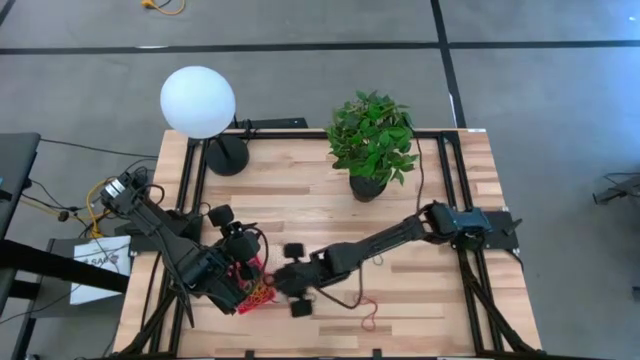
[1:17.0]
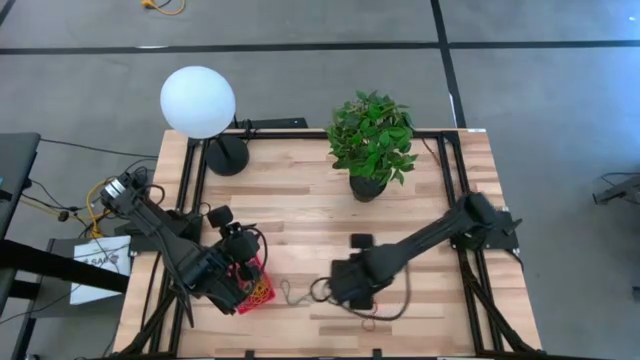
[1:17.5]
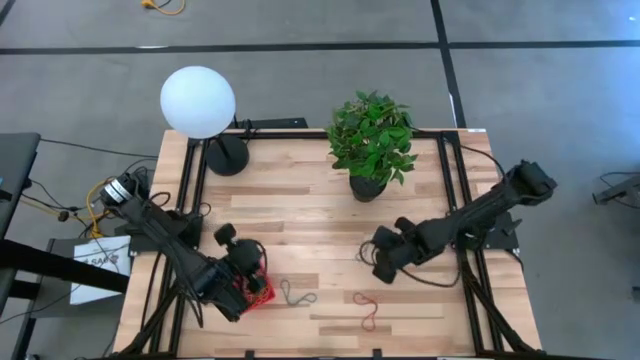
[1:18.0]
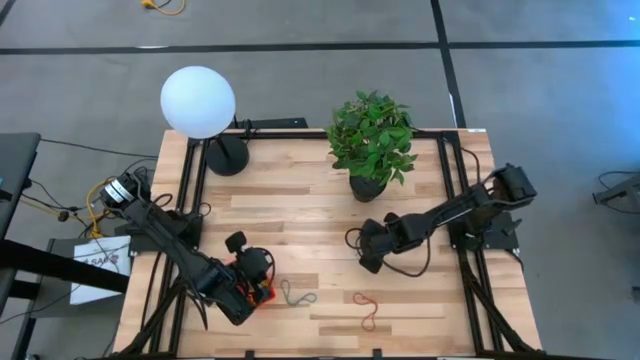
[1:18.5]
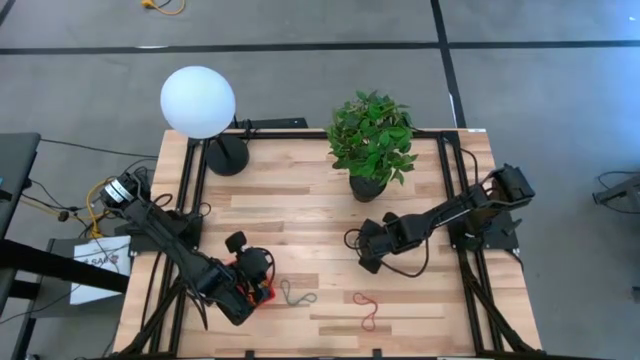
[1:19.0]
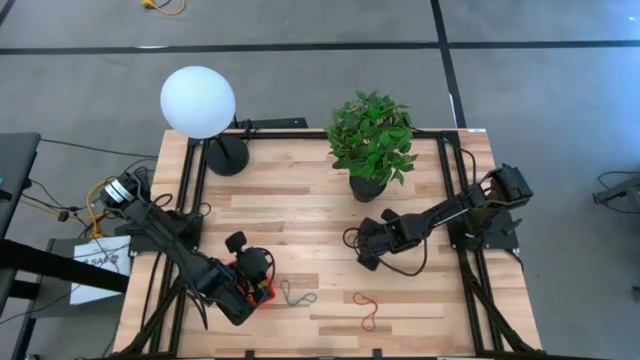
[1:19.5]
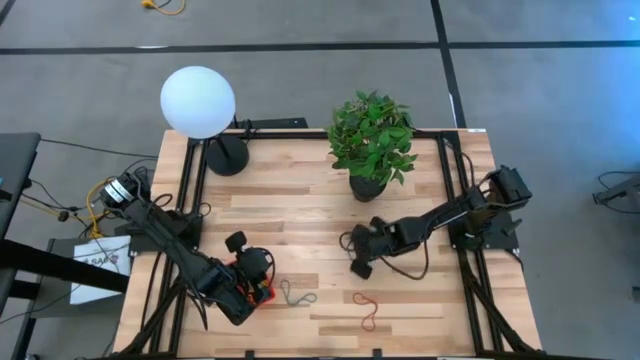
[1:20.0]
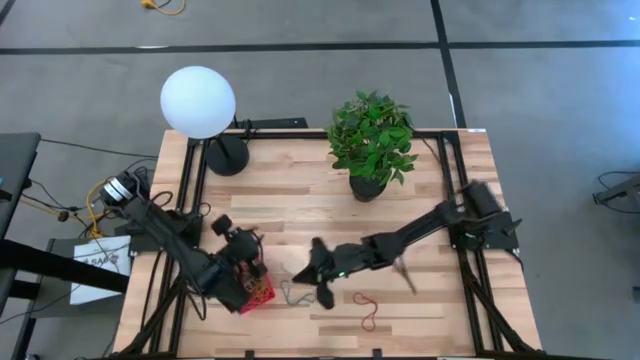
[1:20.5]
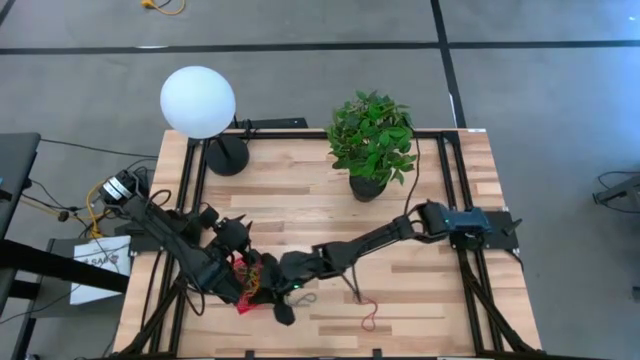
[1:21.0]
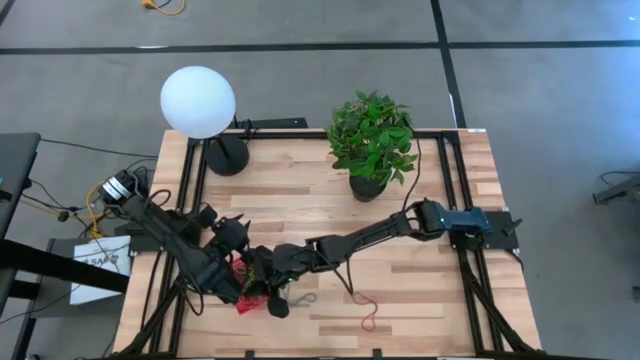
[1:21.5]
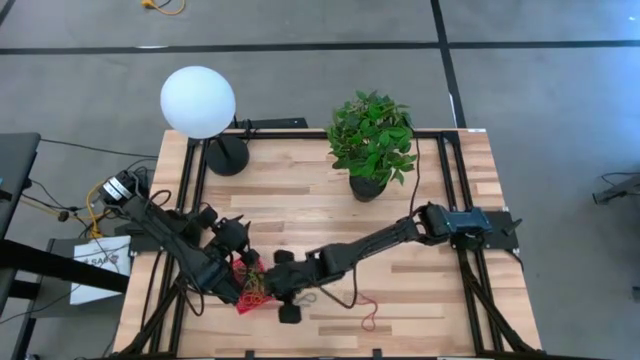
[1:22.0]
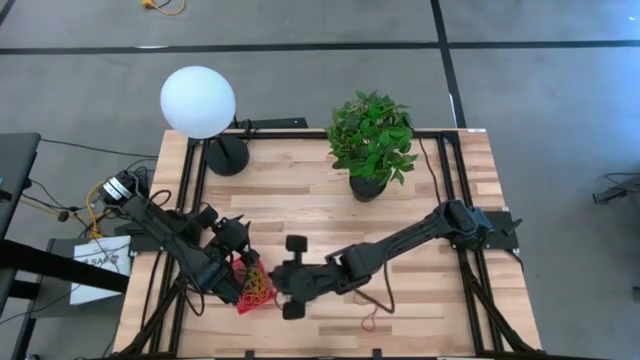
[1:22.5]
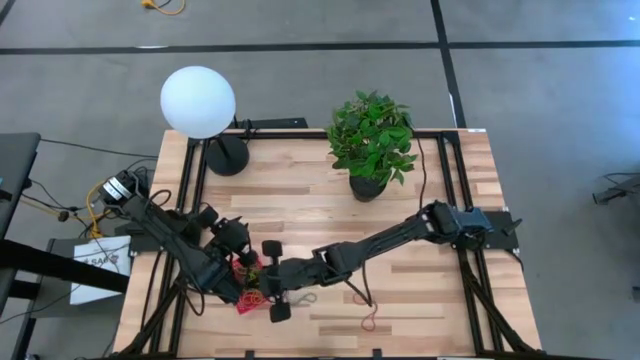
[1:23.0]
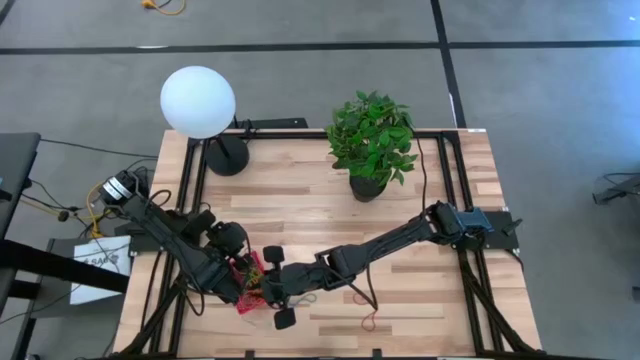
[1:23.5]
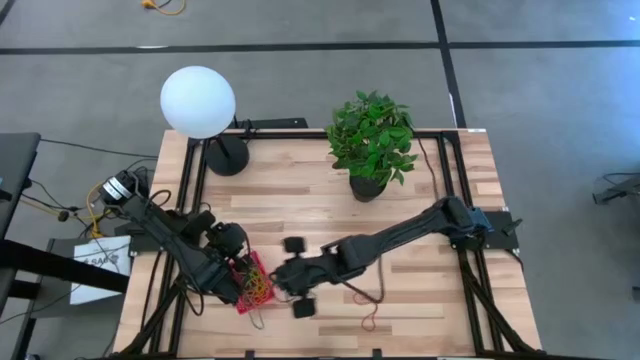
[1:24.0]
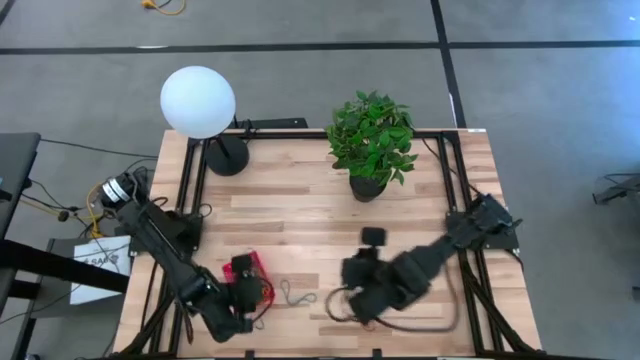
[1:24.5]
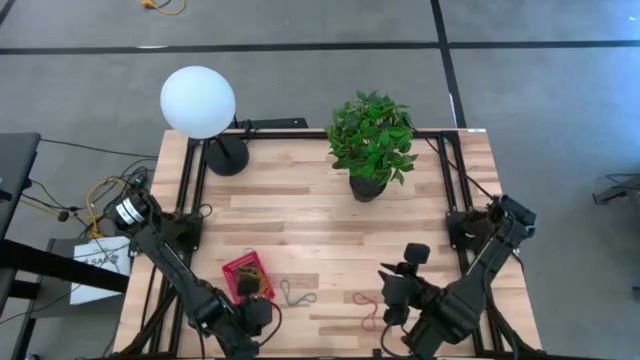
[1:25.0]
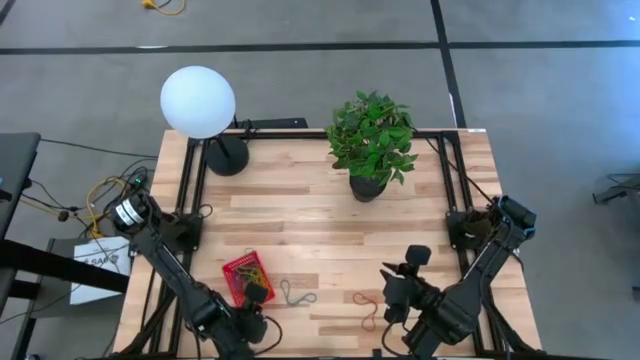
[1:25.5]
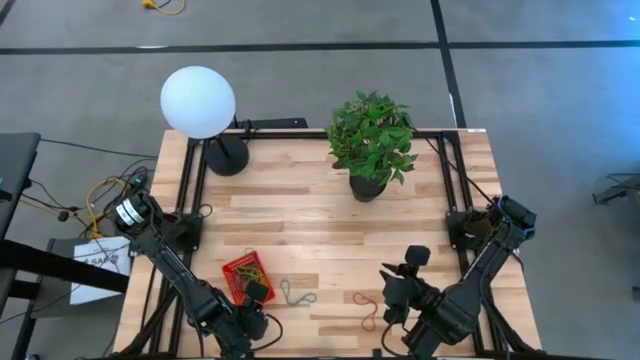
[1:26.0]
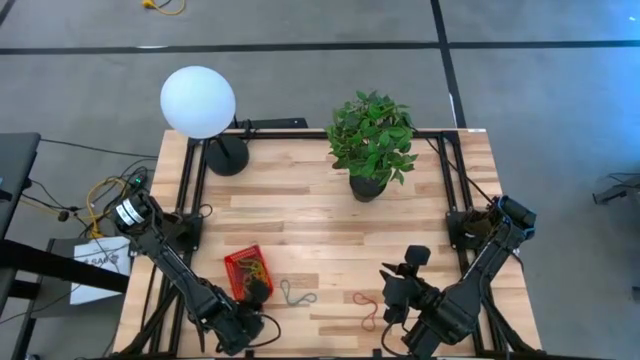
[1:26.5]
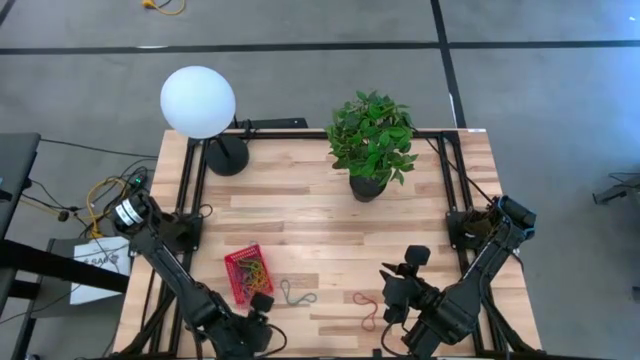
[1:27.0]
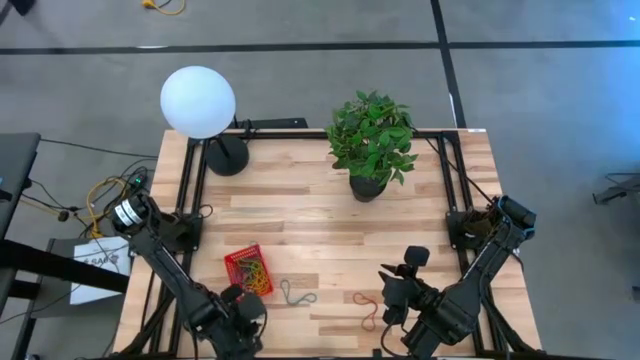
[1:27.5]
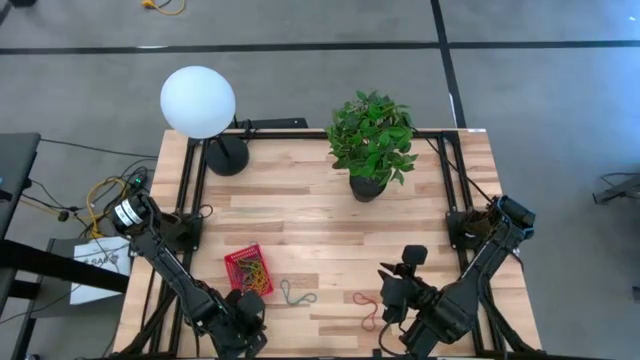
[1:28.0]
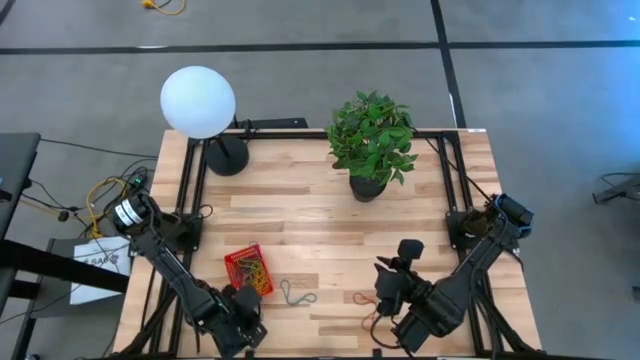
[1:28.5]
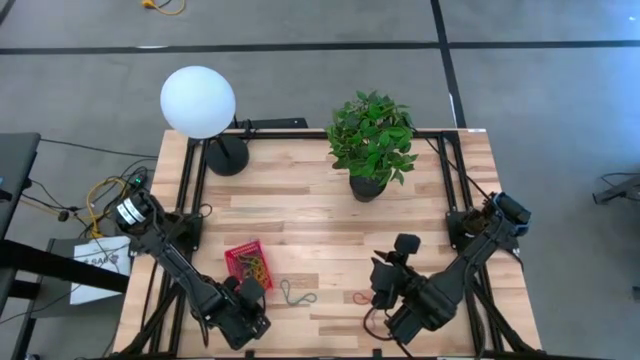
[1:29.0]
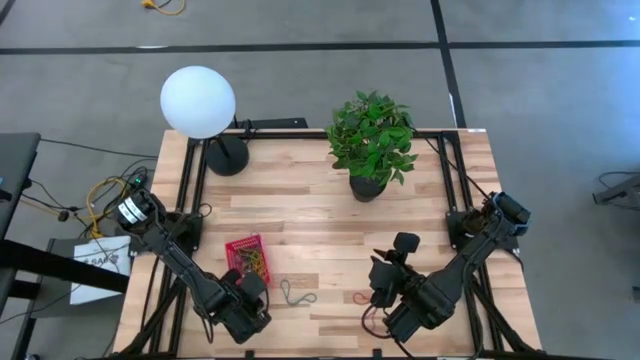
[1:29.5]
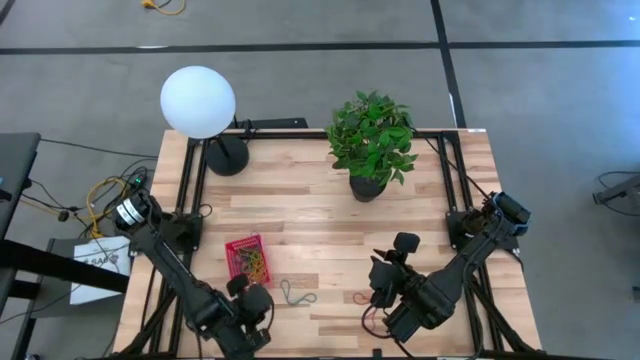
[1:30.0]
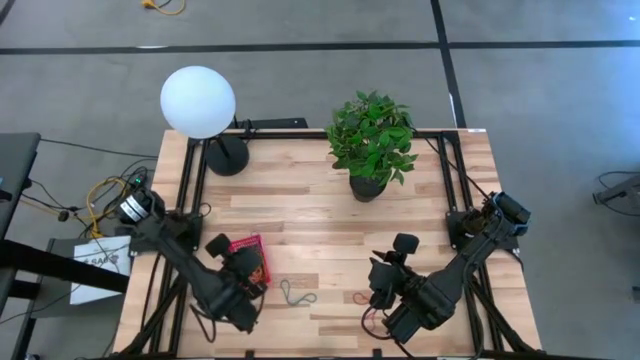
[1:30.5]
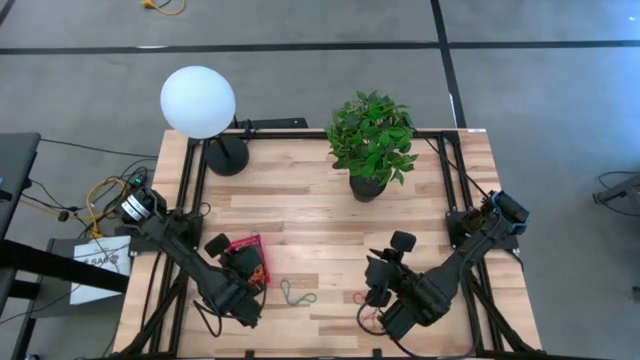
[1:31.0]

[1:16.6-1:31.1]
Task: Pick and place items into bin
Put the blue rubber band into the red bin

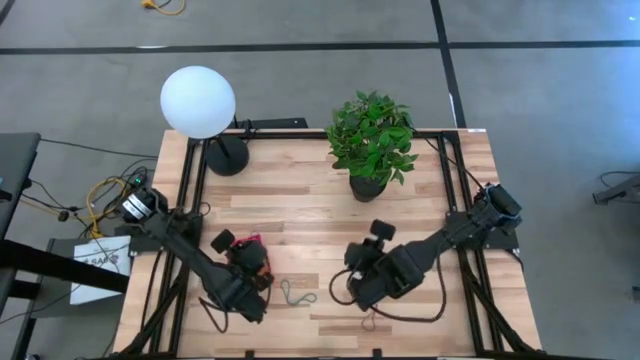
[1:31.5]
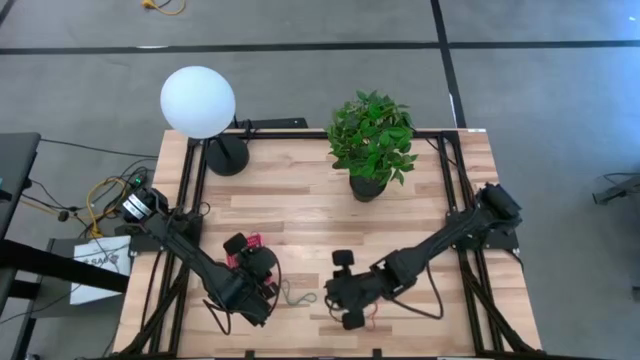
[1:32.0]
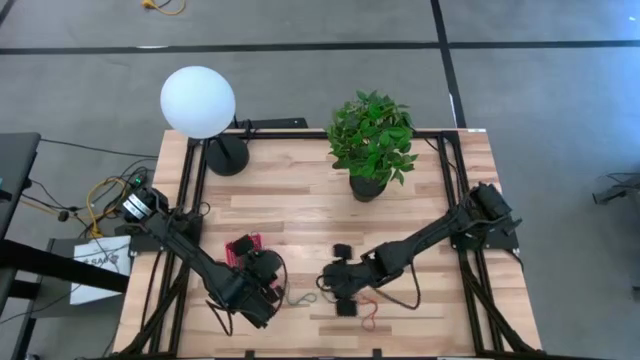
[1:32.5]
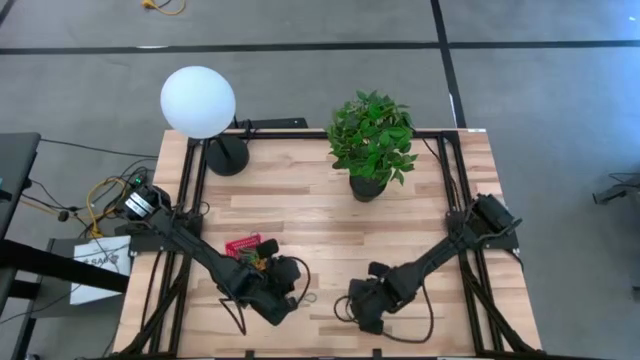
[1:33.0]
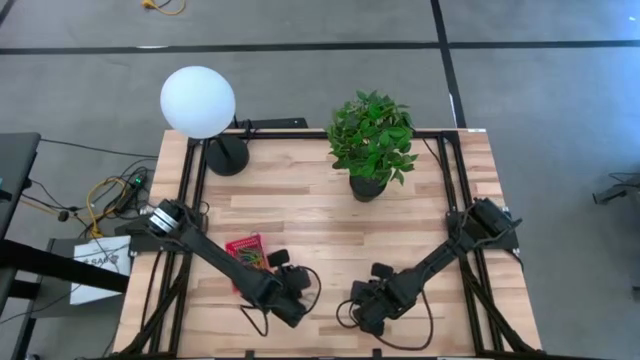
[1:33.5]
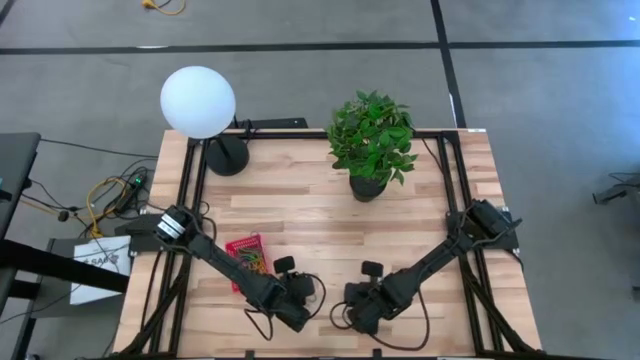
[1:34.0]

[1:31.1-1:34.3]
Put the red rubber band into the red bin

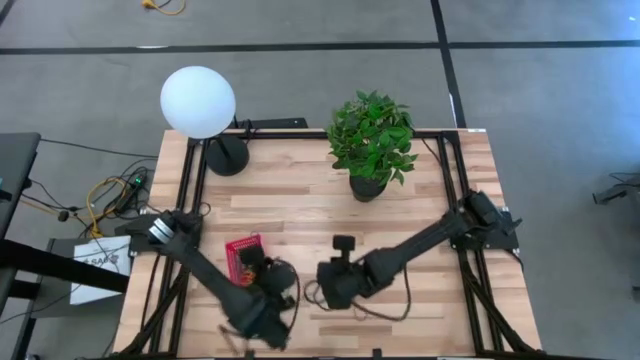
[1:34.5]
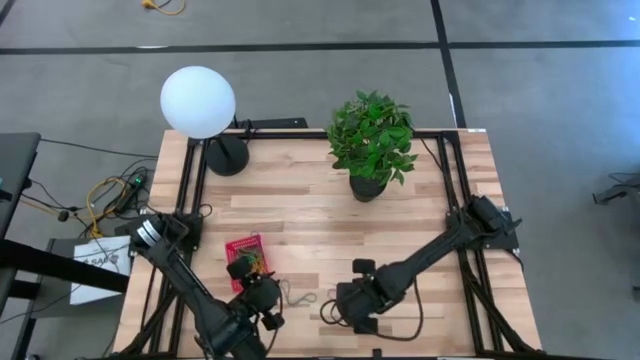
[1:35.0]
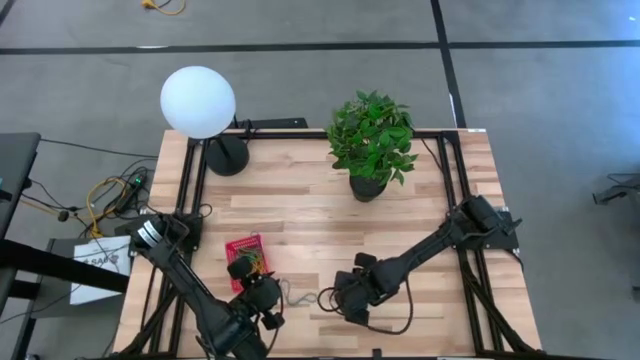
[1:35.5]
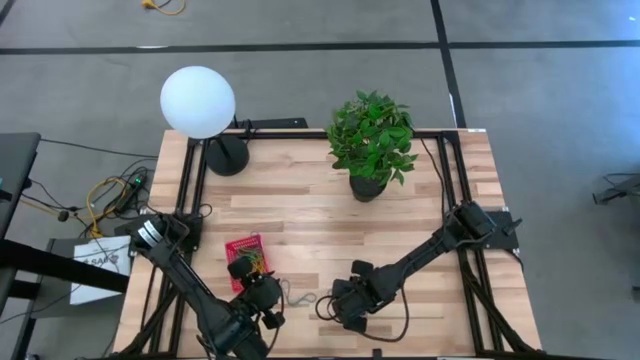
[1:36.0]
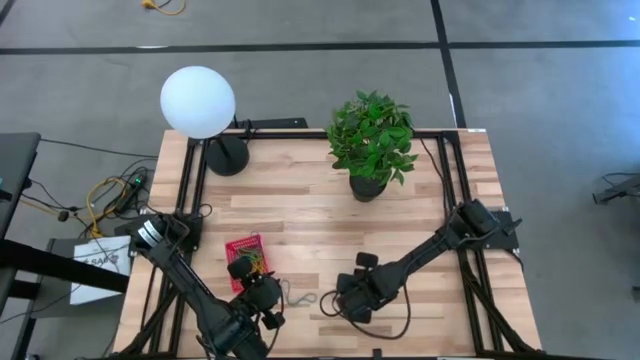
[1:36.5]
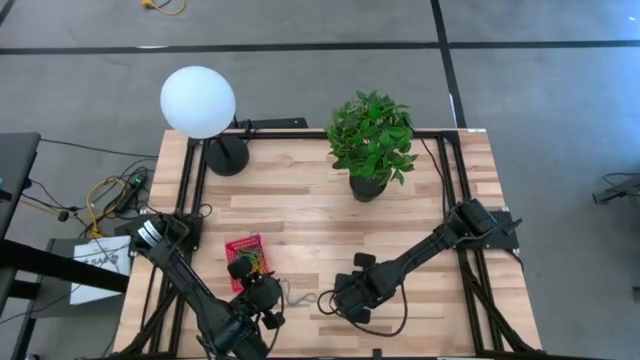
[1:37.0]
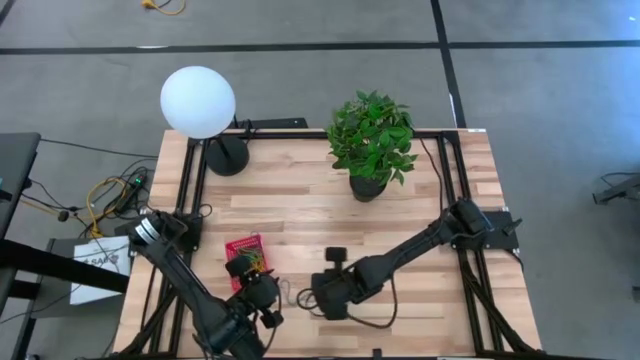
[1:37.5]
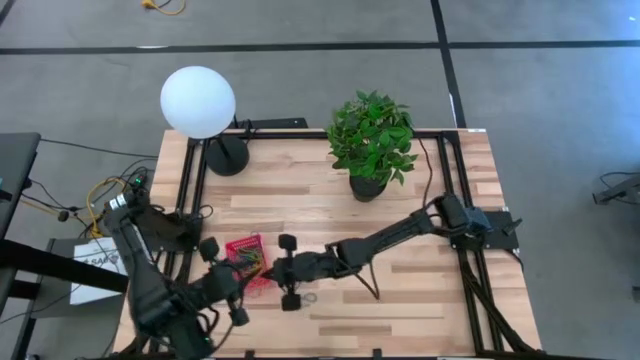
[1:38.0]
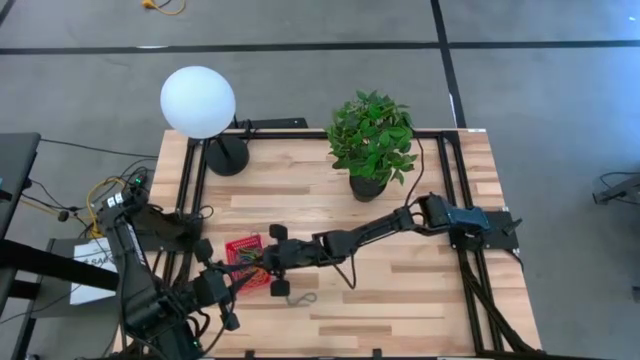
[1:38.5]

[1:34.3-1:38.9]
Put the red rubber band into the red bin
